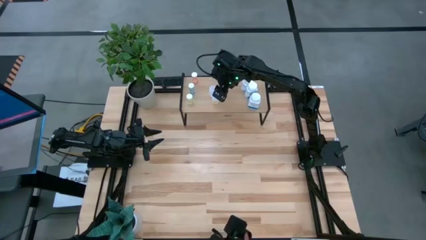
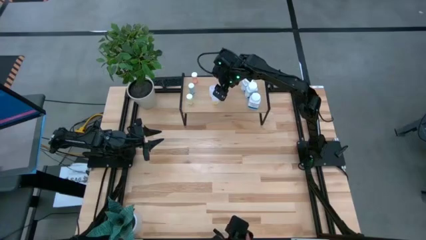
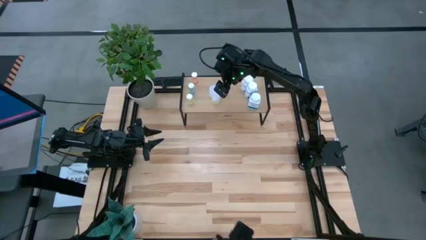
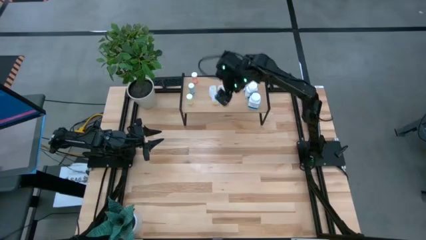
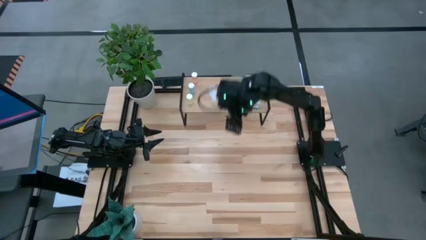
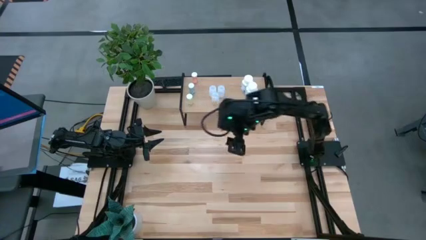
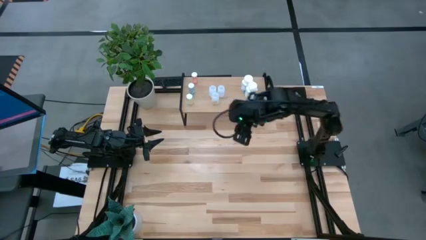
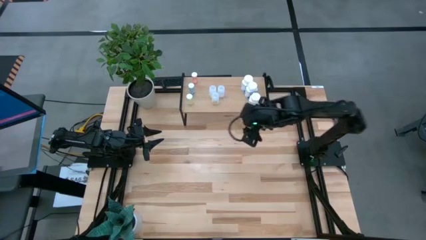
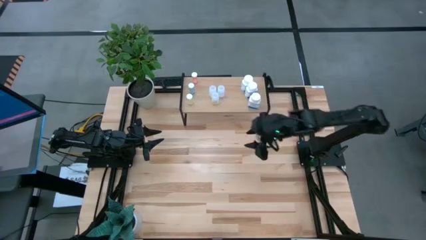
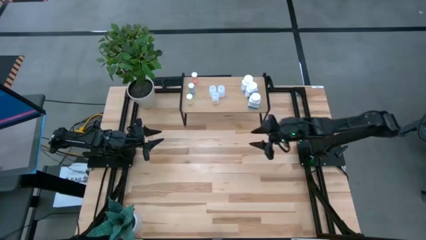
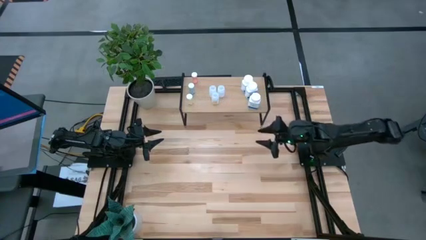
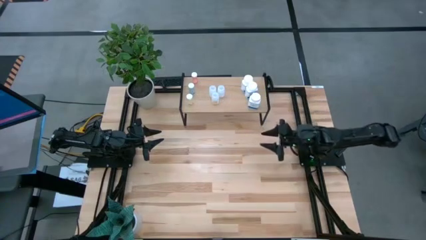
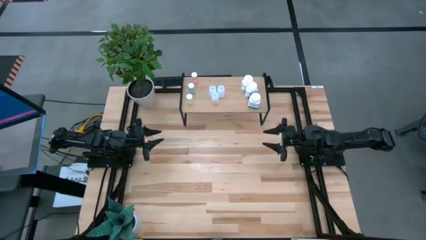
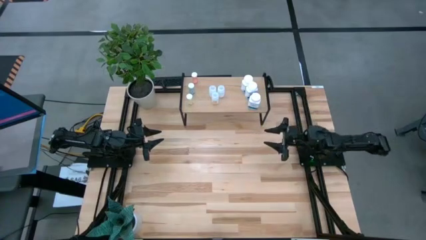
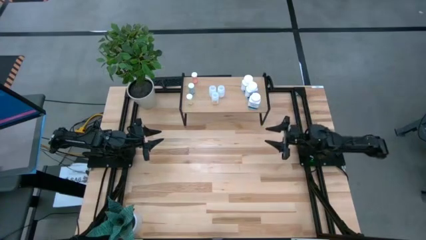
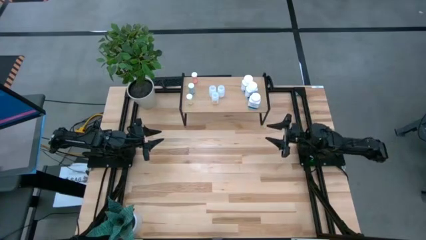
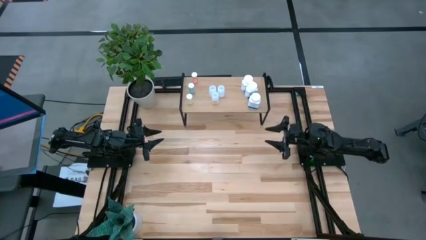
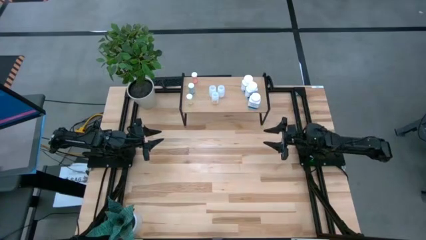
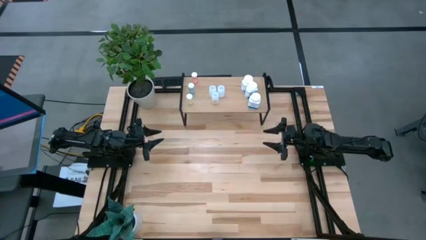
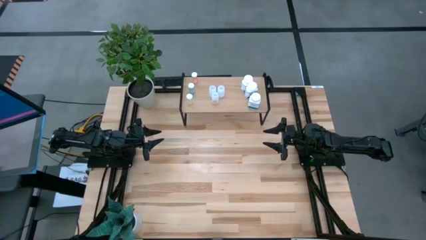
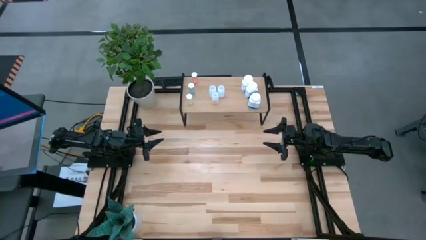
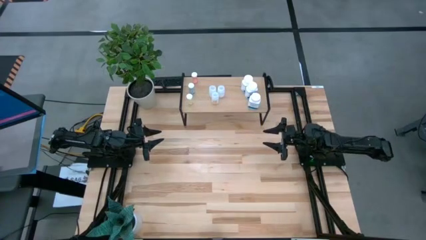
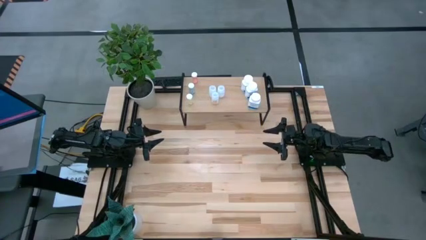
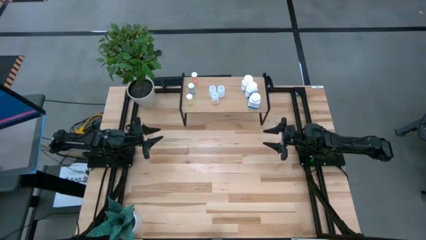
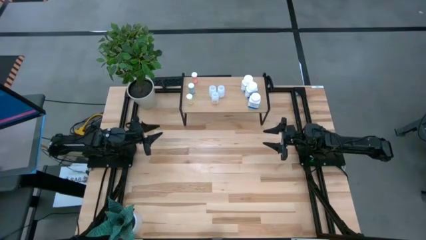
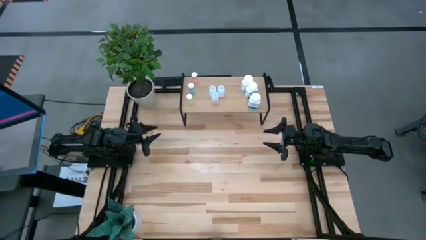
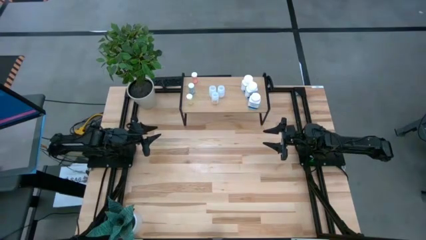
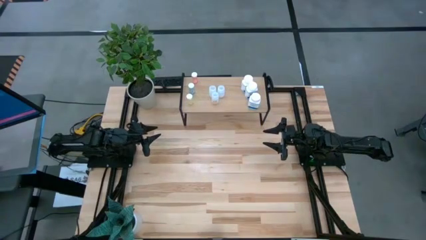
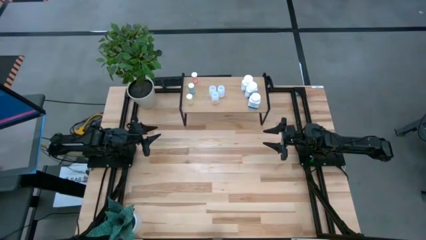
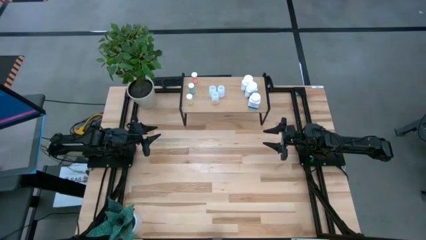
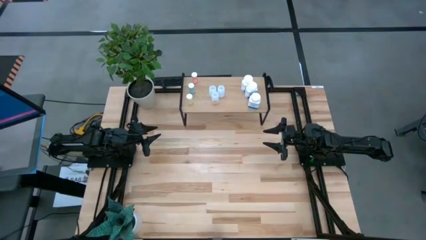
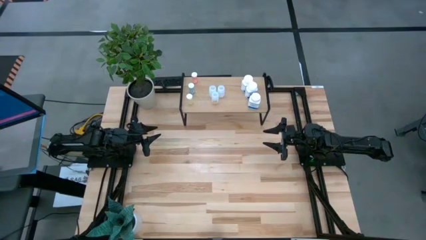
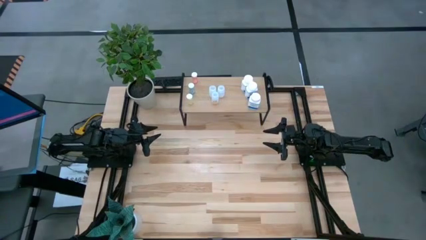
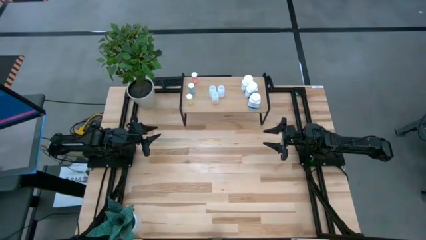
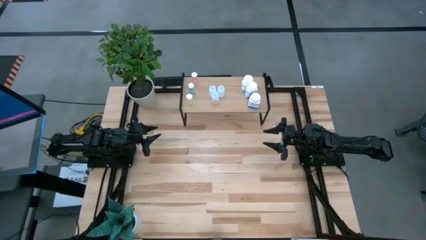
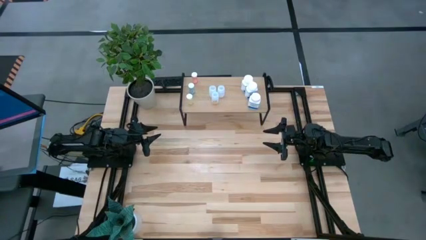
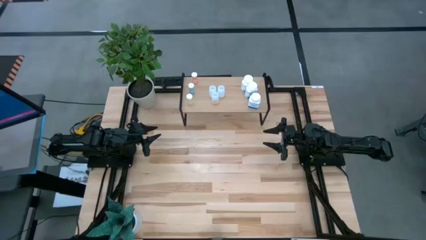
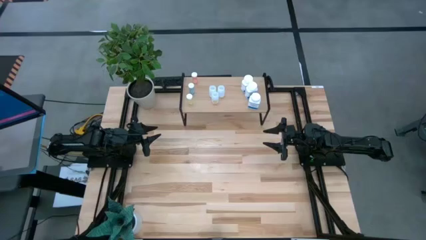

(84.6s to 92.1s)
Task: Pick and place medicine bottles onto shelf by color
Return to Home Position

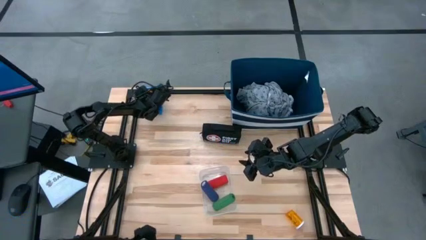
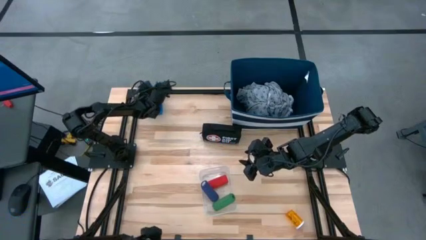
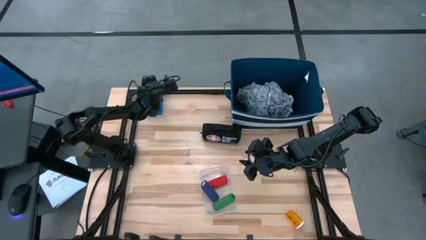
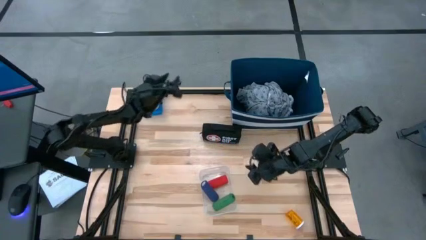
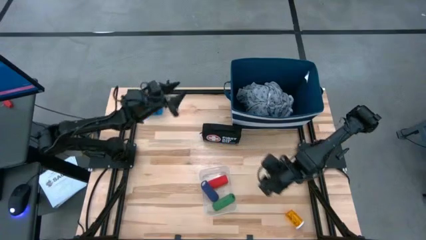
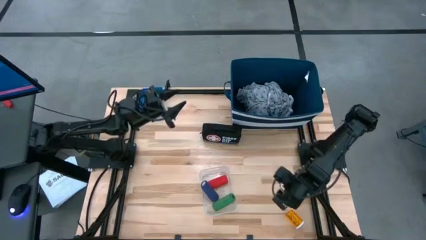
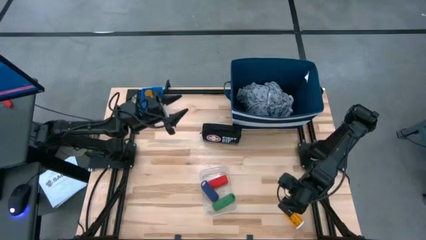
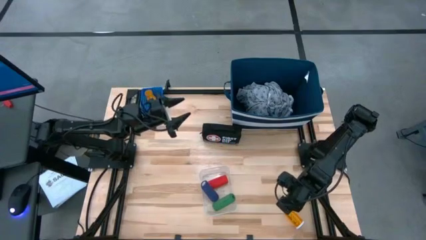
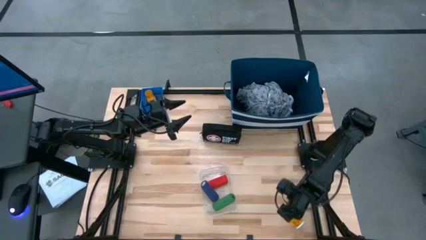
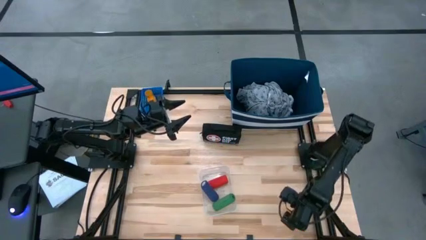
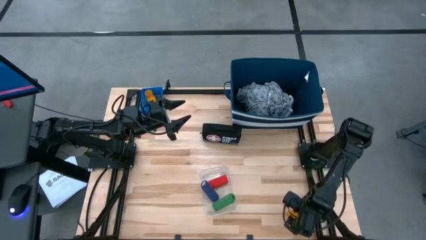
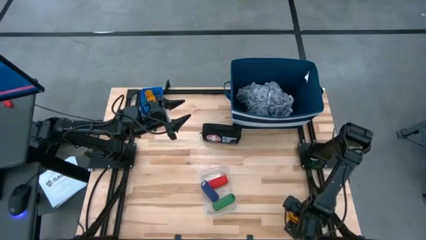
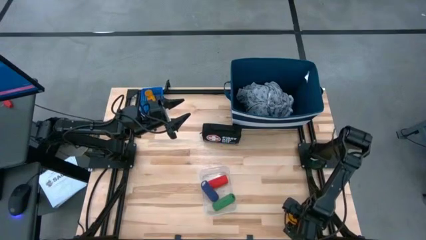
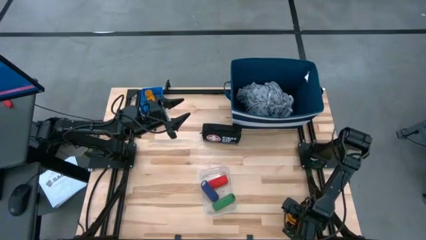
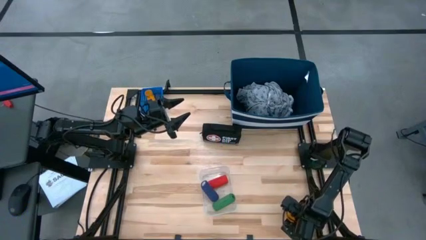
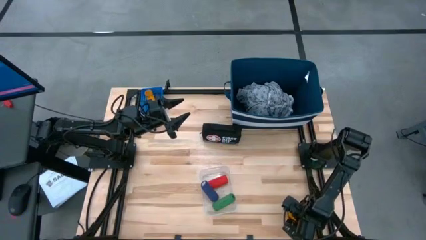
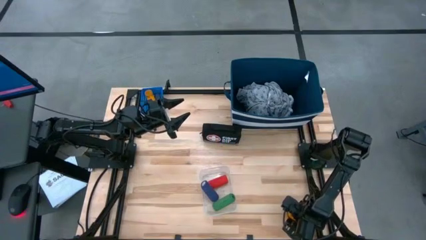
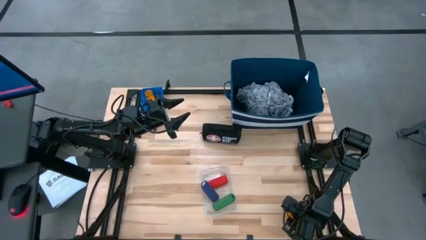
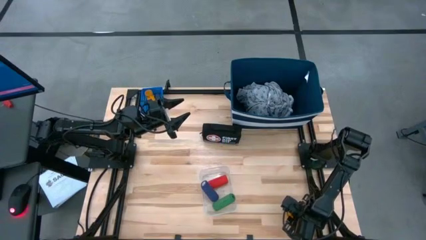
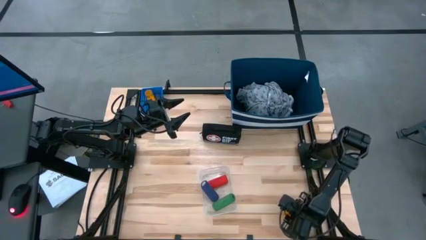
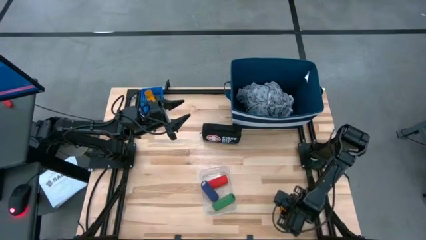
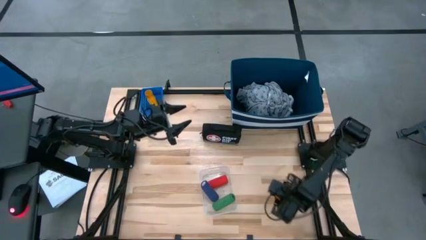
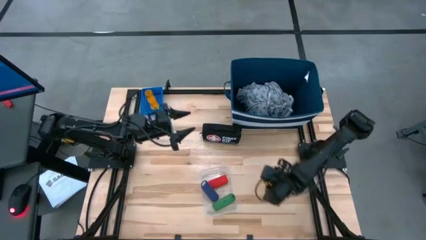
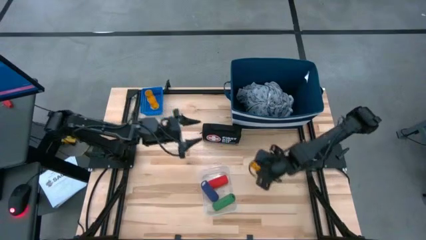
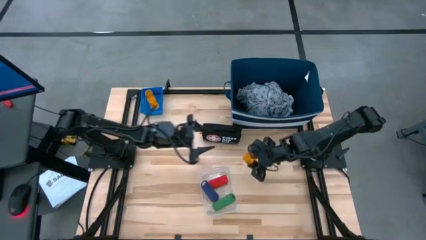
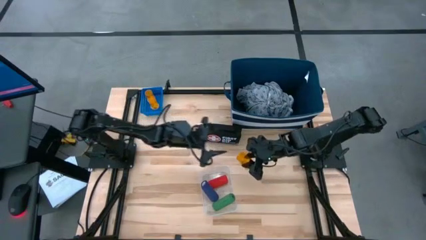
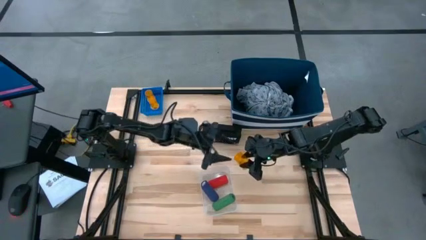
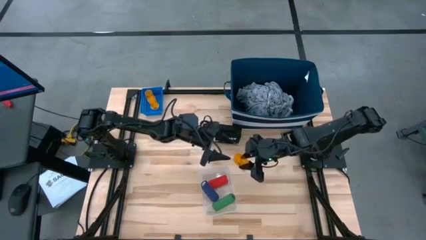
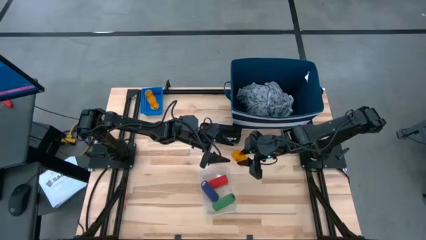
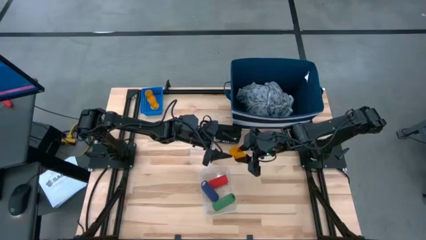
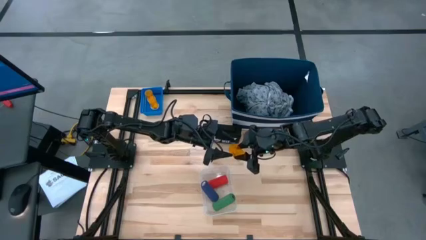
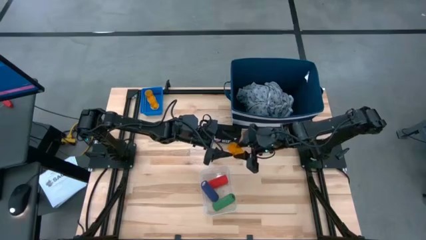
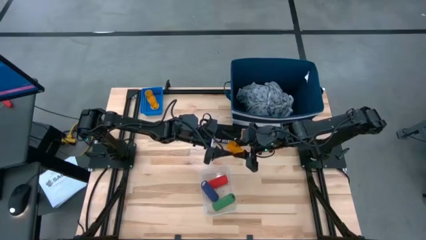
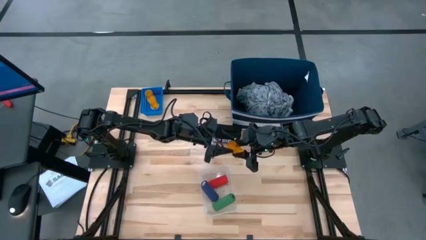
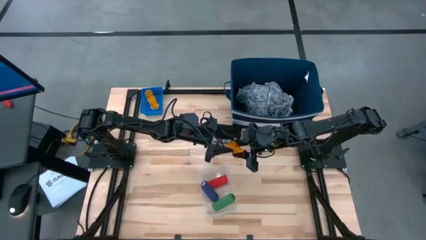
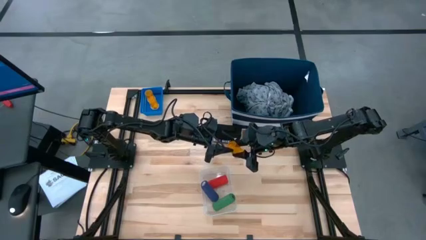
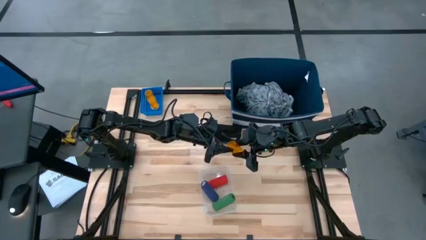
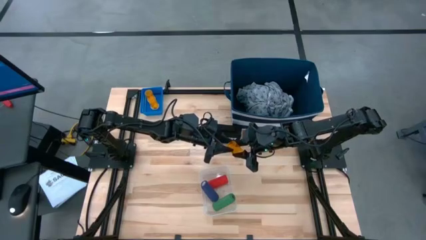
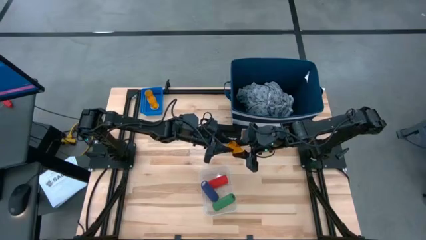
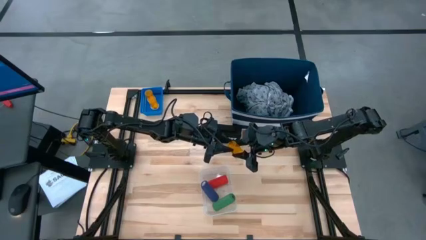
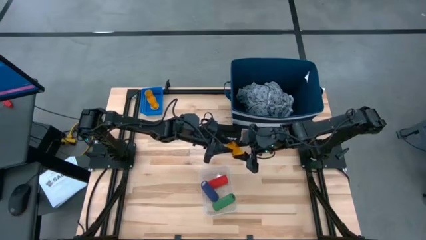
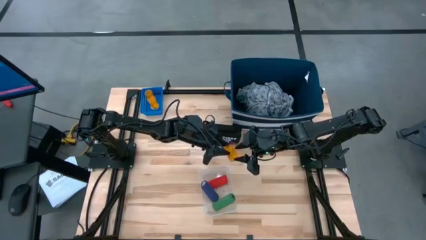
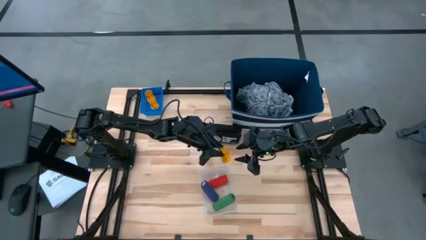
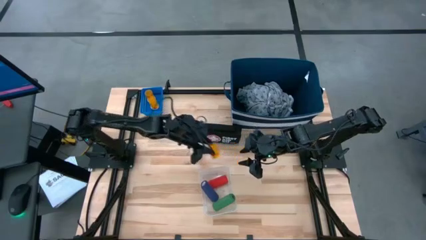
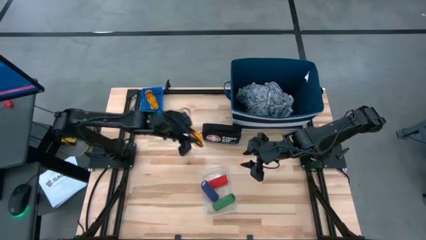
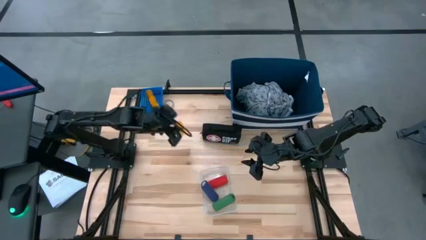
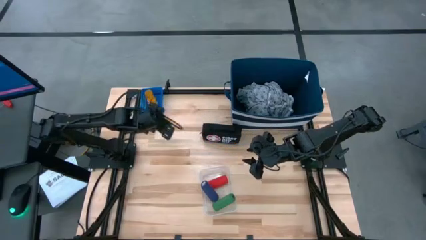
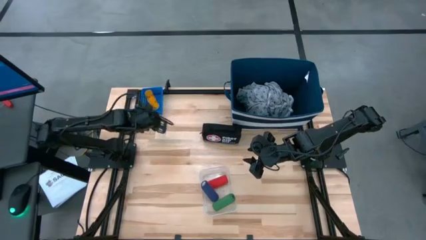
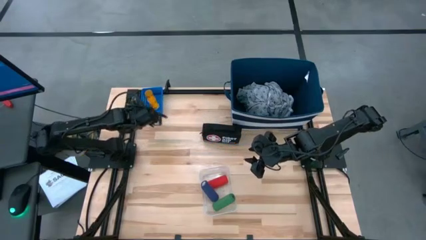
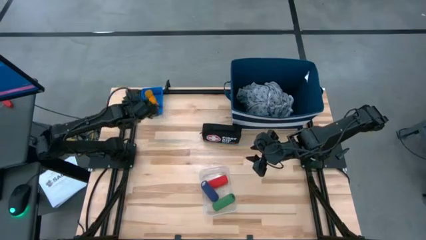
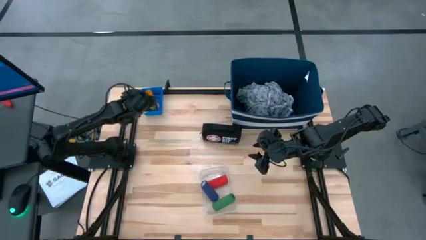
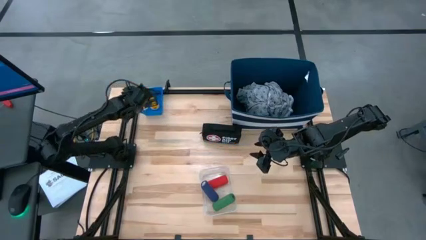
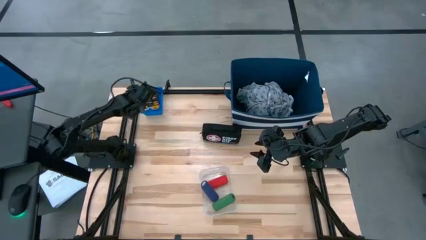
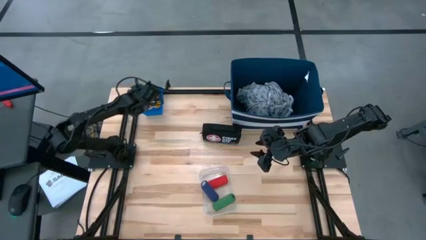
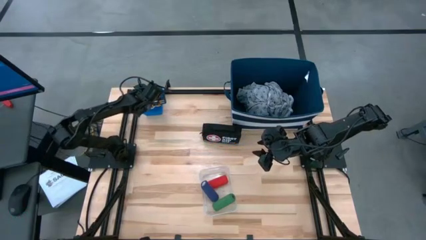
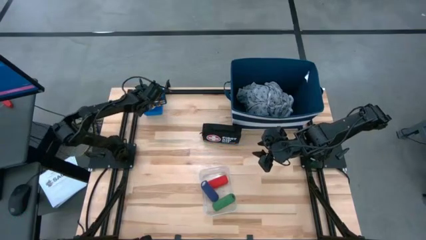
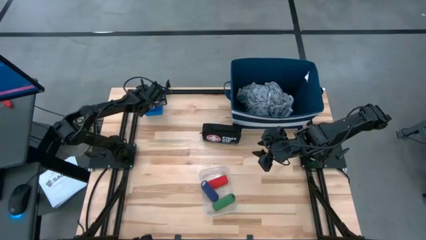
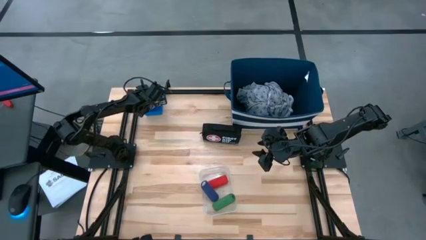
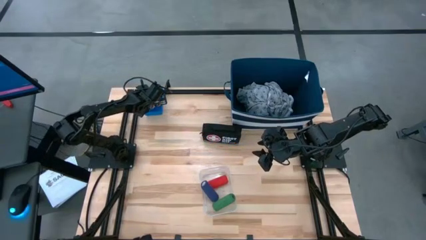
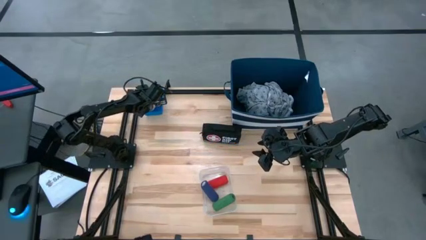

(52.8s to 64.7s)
Task: Pick & place medical supplies in basket/bin
Put the orange pill bottle into the blue bin
